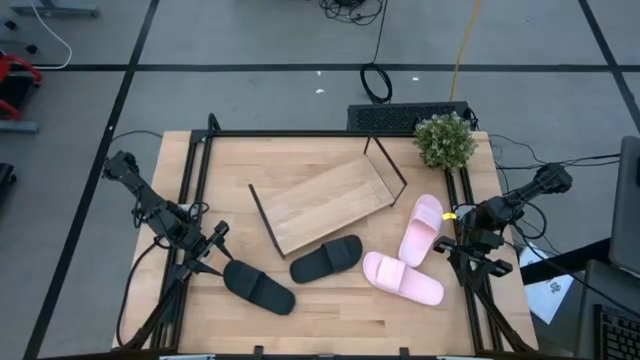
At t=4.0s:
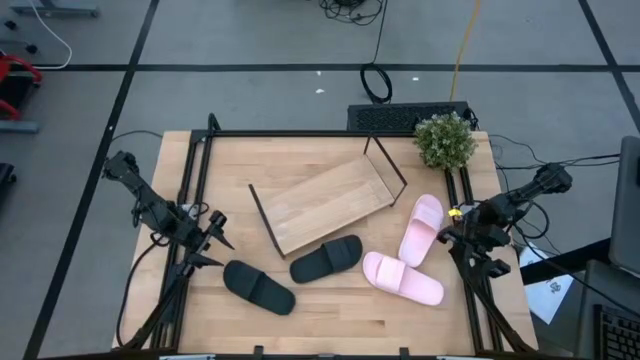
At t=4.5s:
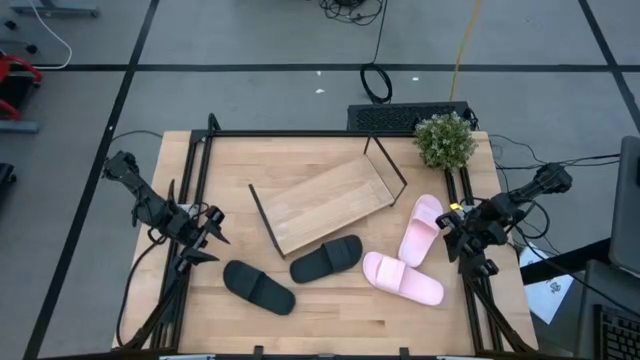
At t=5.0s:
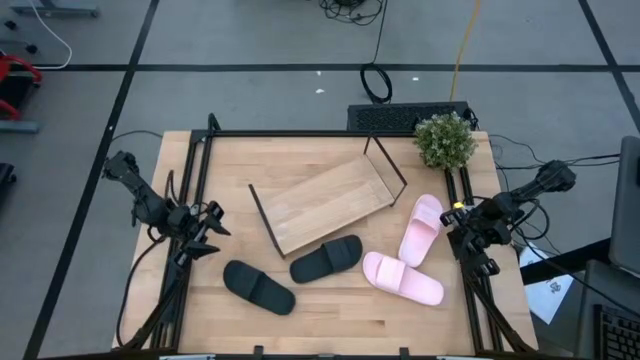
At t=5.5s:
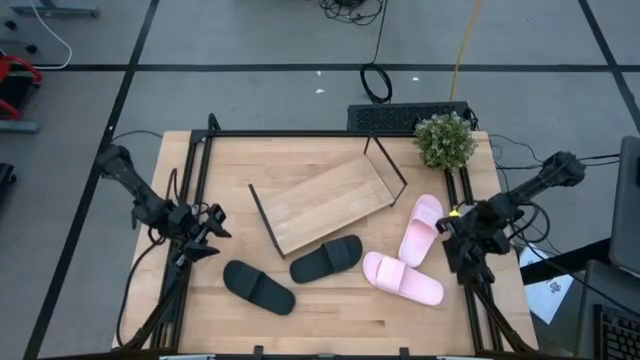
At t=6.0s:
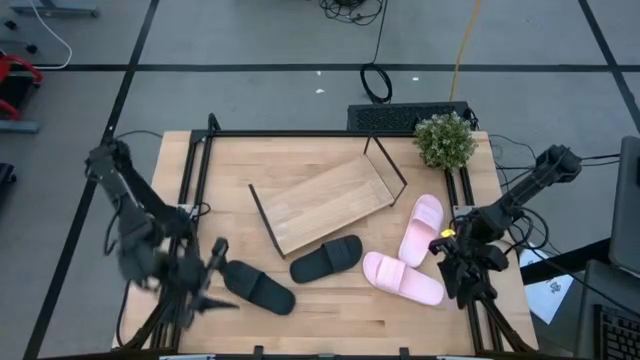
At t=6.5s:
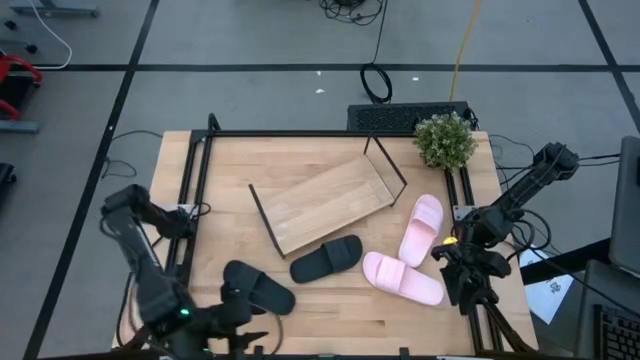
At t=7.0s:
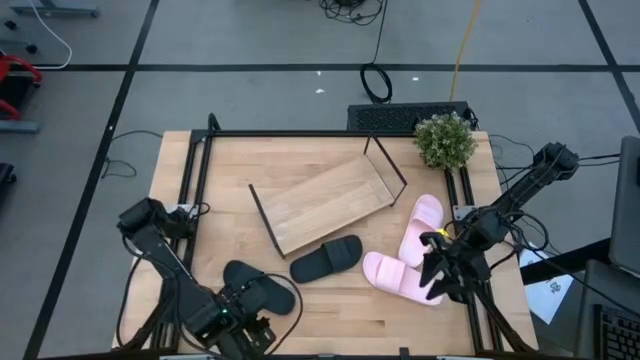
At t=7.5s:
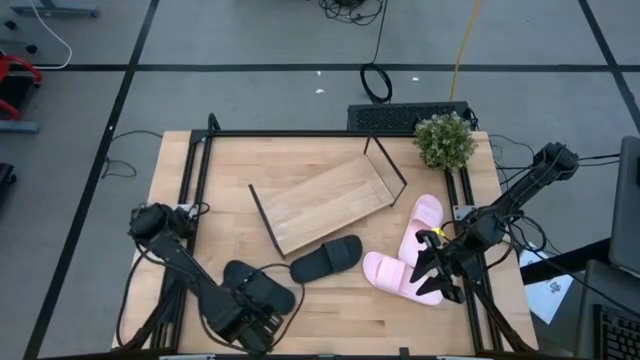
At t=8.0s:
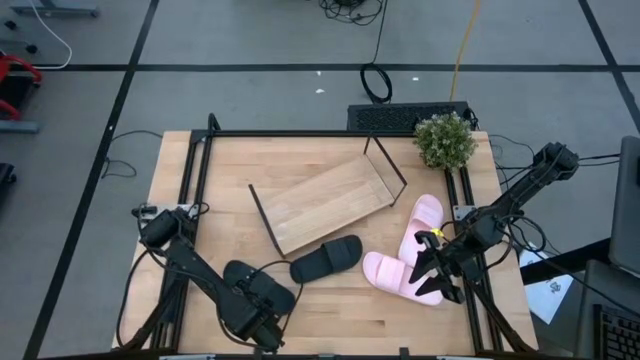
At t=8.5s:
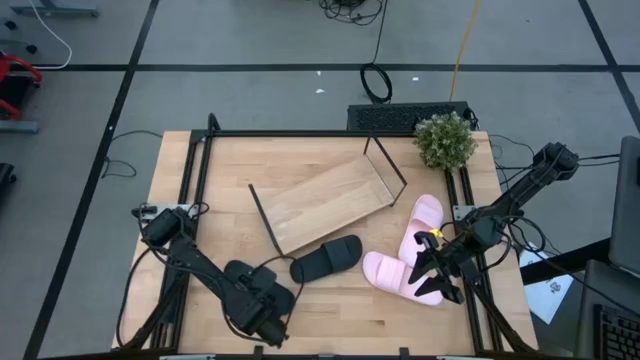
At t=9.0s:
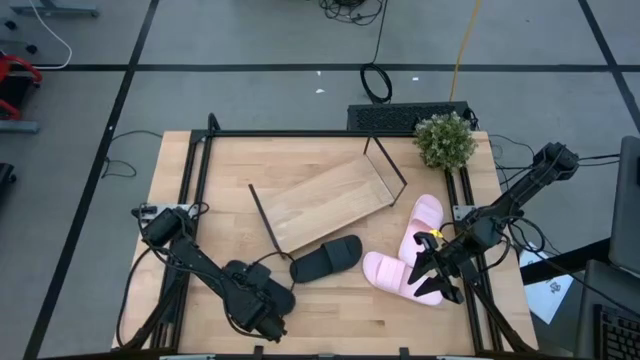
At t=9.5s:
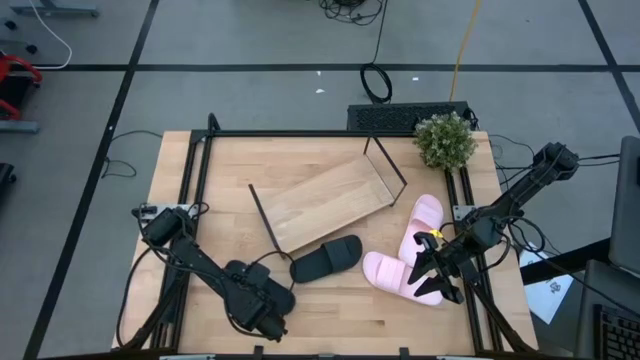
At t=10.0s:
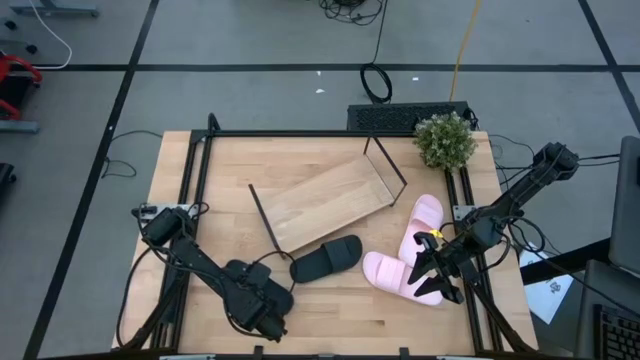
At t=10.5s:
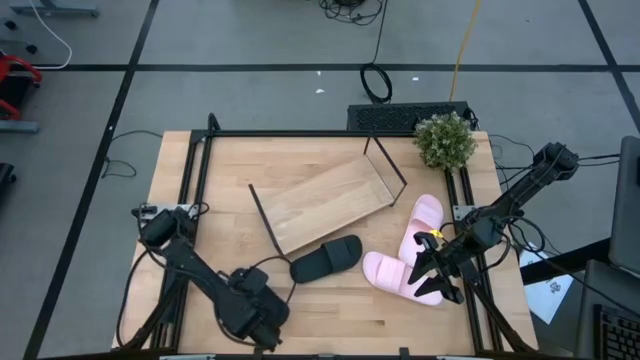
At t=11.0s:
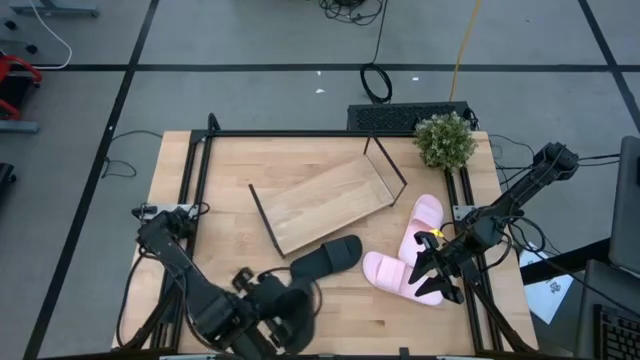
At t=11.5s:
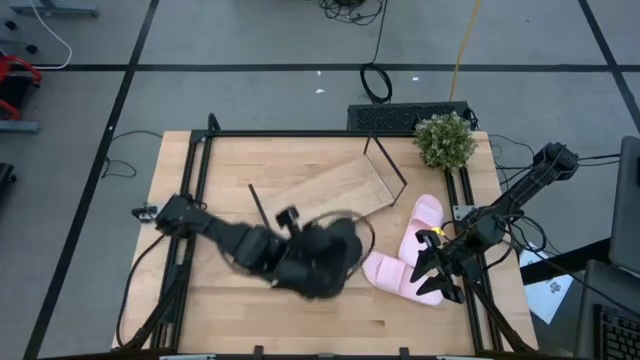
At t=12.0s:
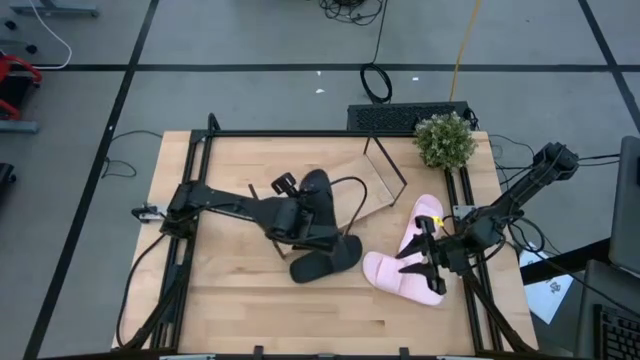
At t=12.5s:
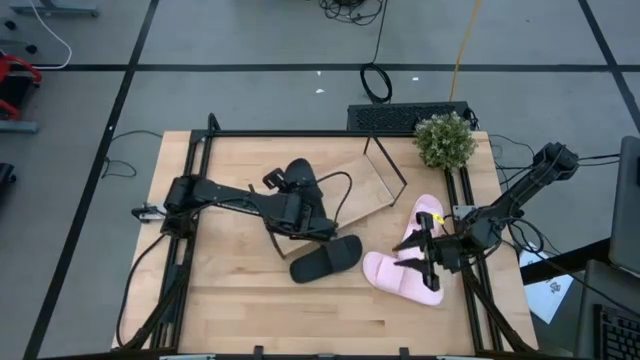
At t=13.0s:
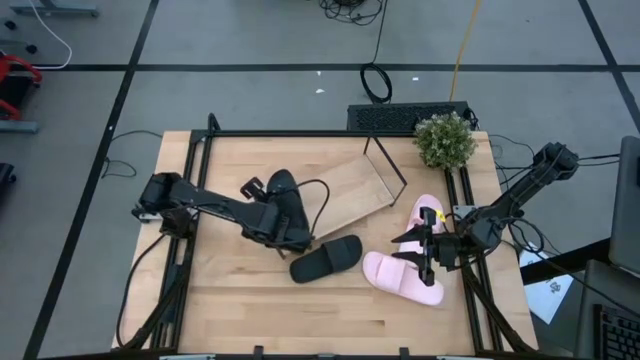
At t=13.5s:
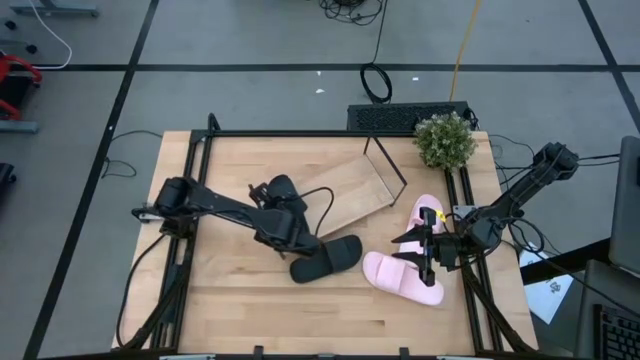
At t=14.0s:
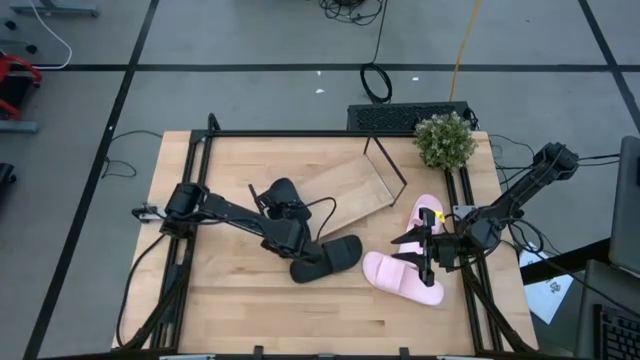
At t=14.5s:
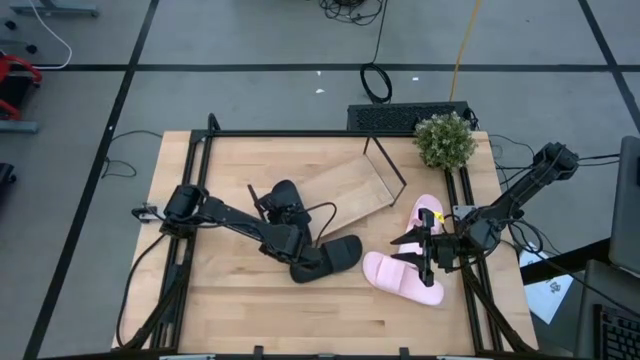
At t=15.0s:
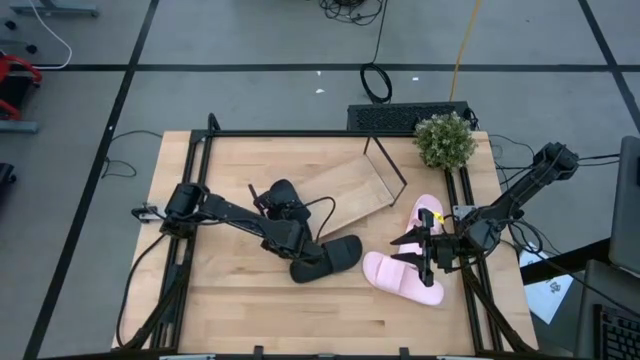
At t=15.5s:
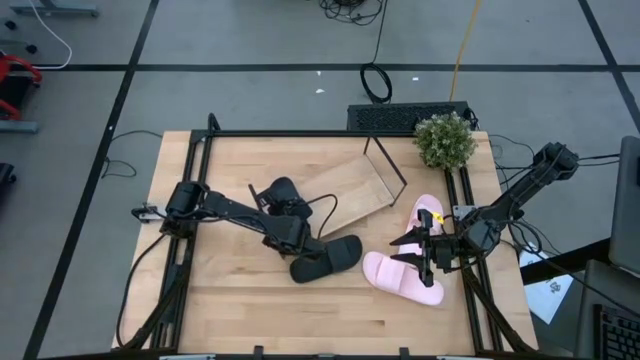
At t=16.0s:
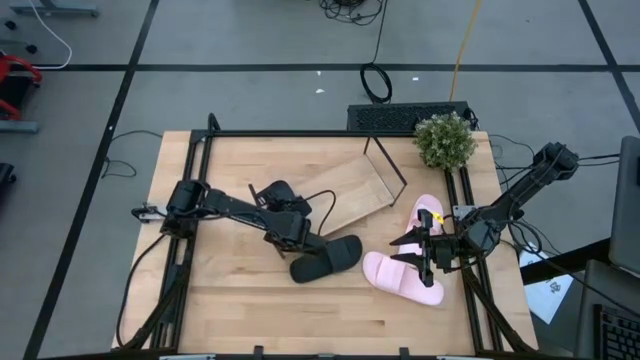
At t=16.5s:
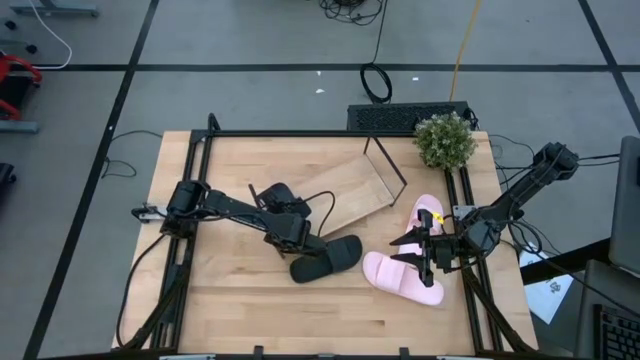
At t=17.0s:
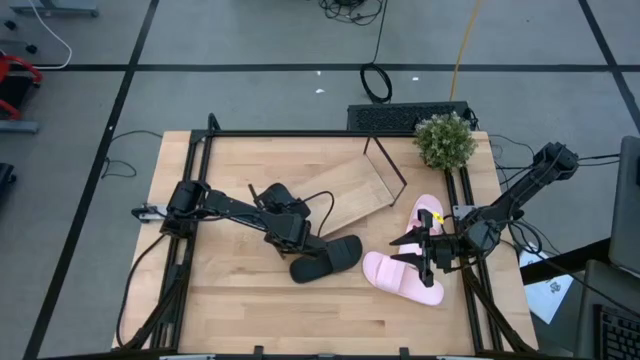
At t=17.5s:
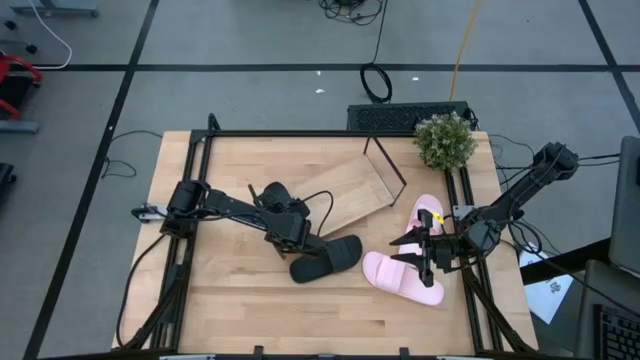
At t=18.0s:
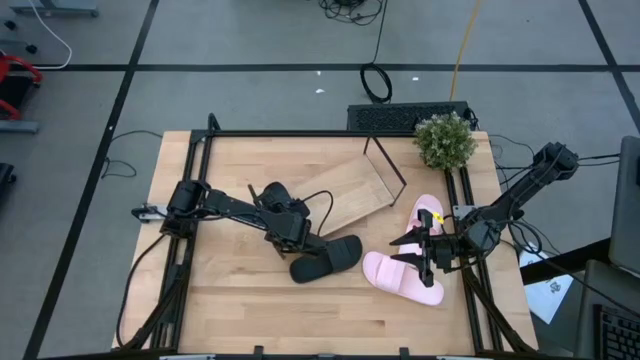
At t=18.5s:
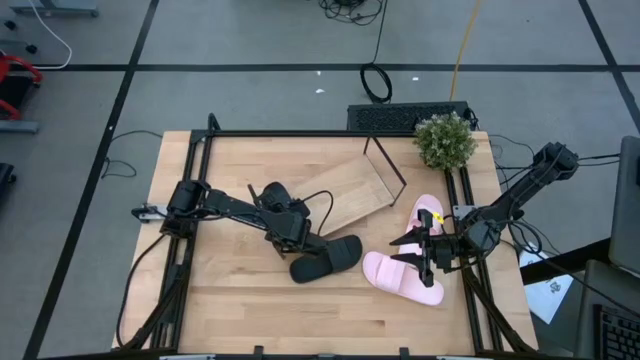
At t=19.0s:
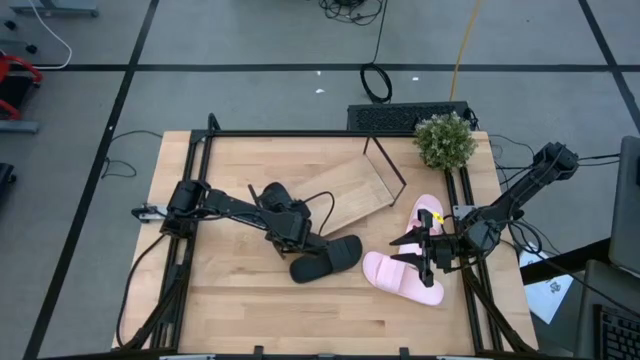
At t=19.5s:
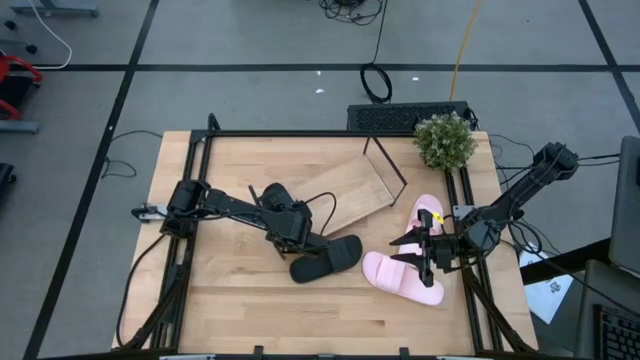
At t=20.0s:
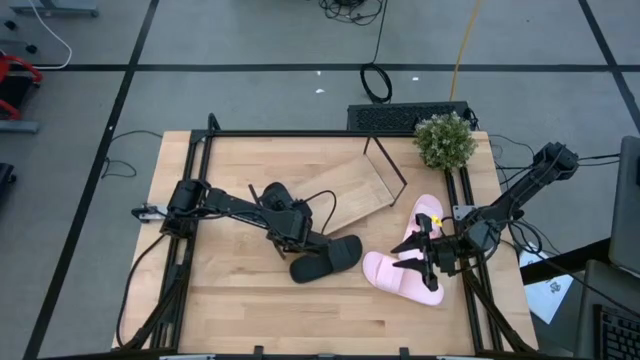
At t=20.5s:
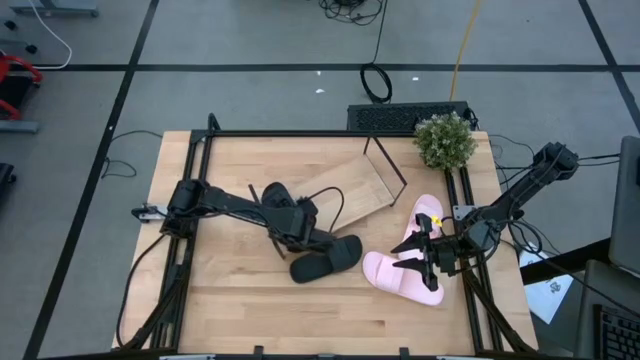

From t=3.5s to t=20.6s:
Task: Pick and place slides into the shelf
Put the left black slipper on the shelf

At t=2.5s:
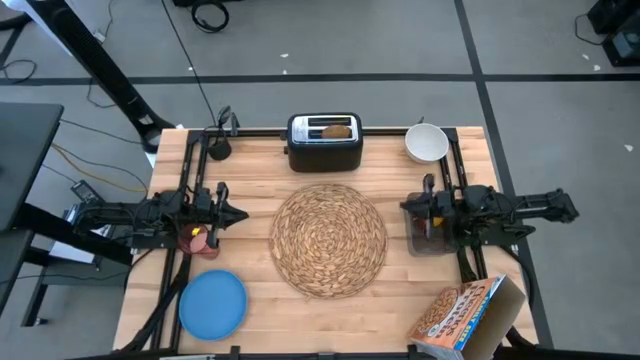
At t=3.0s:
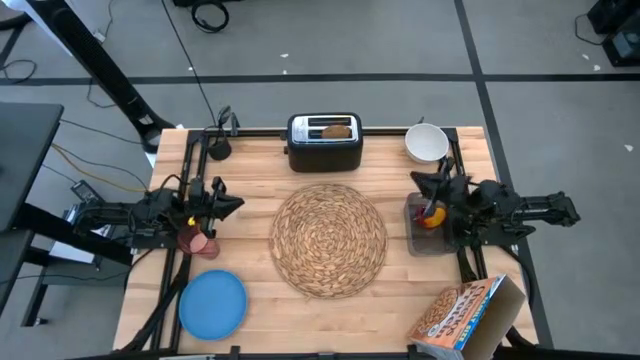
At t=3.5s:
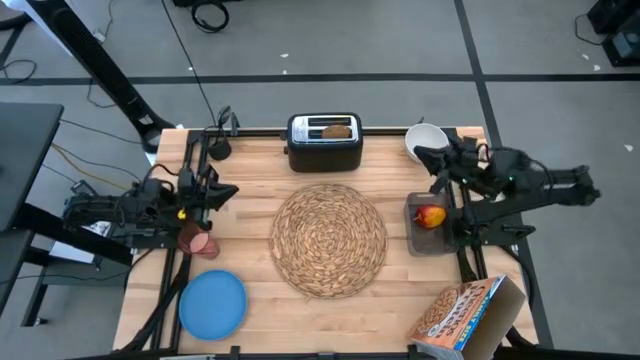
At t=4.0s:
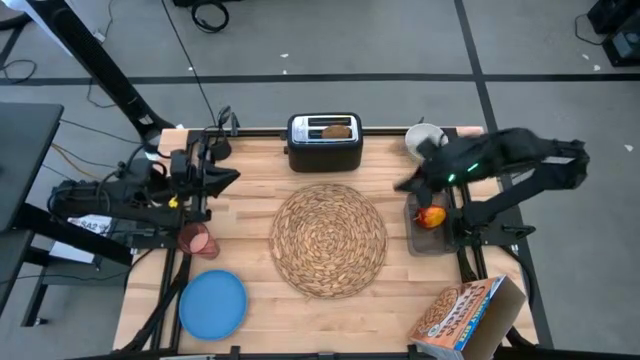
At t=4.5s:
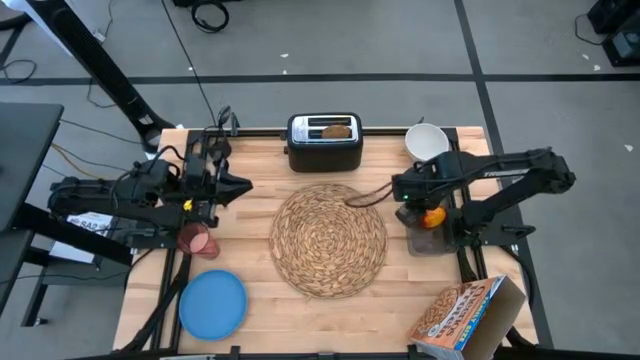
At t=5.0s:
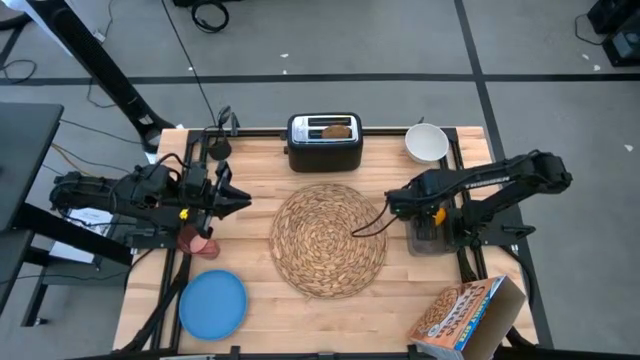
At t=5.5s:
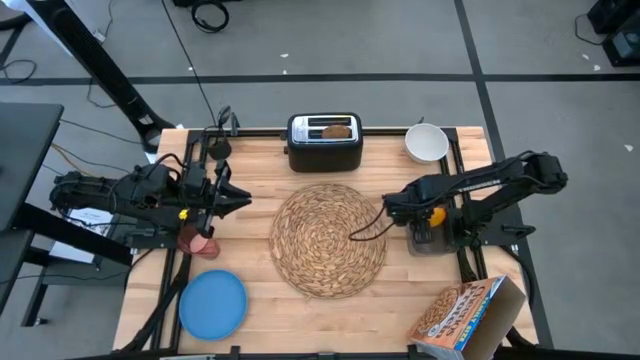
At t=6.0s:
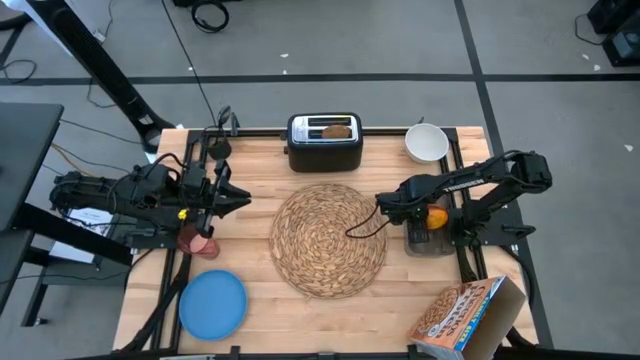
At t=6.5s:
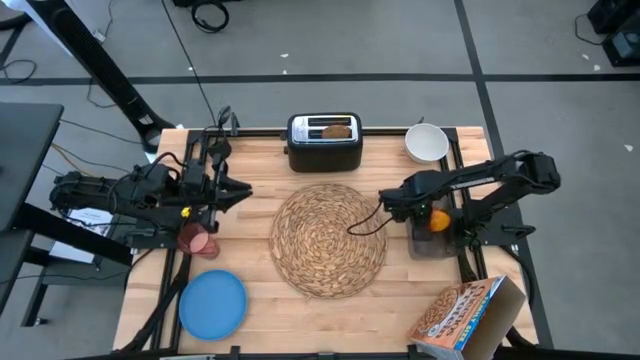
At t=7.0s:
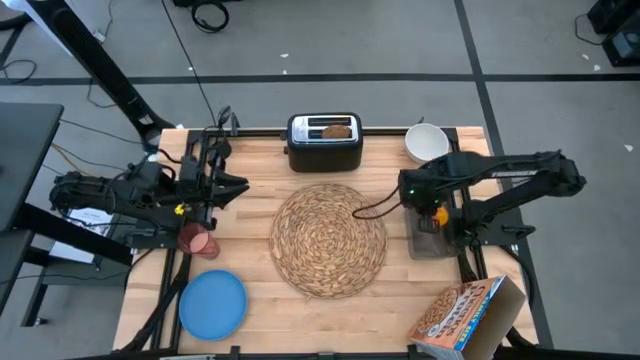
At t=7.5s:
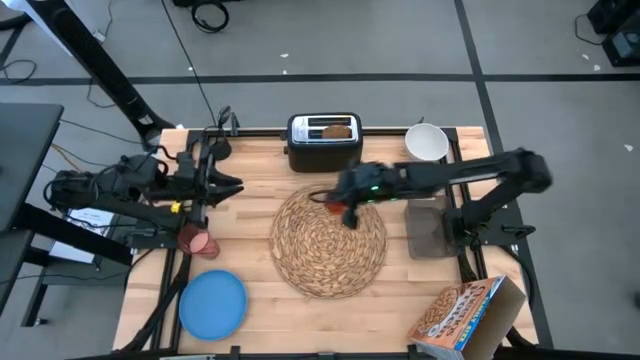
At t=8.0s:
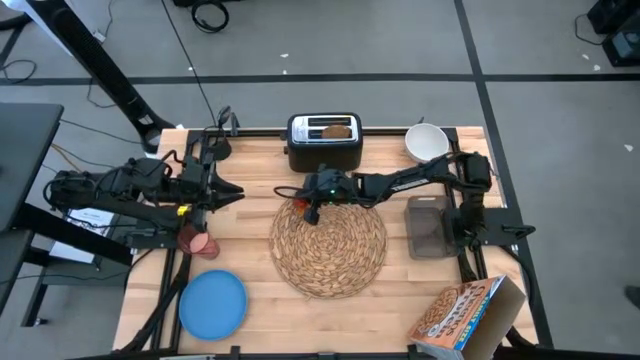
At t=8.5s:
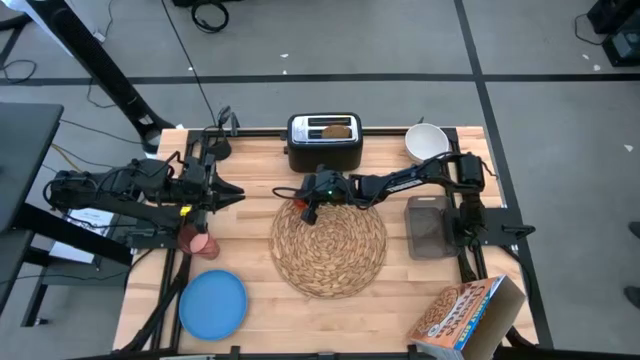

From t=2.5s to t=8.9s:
Task: Arrange a breakfast setting
Put the red apple on top of the brown table mat
